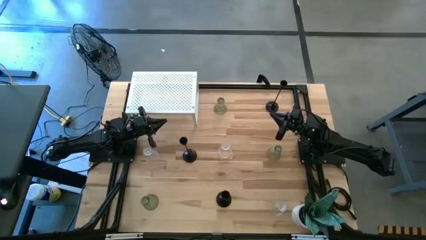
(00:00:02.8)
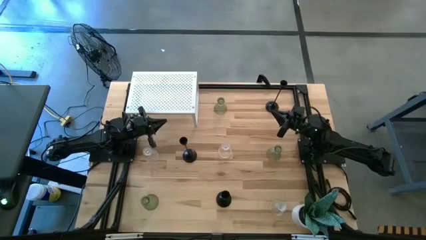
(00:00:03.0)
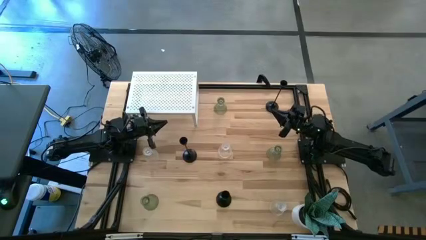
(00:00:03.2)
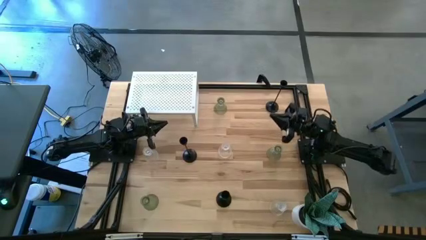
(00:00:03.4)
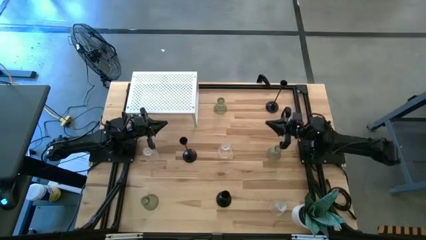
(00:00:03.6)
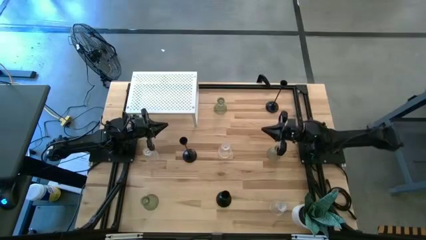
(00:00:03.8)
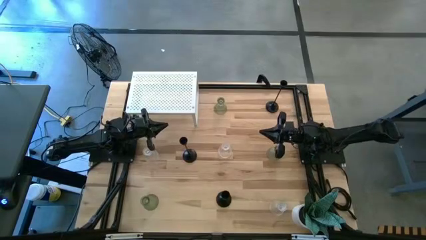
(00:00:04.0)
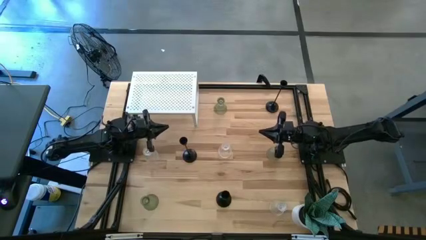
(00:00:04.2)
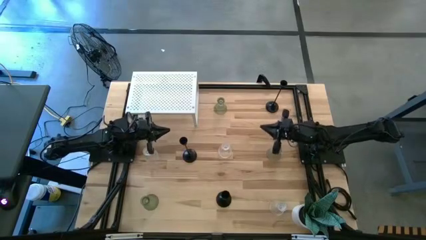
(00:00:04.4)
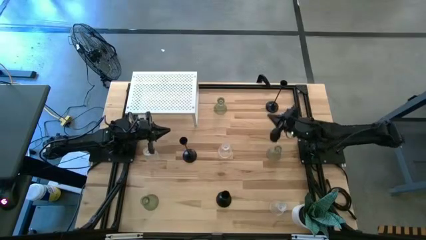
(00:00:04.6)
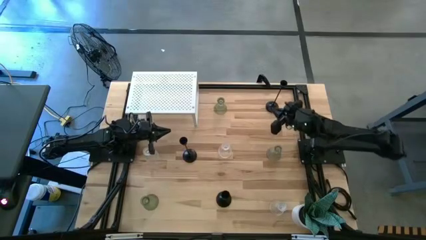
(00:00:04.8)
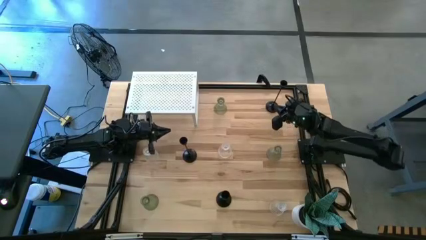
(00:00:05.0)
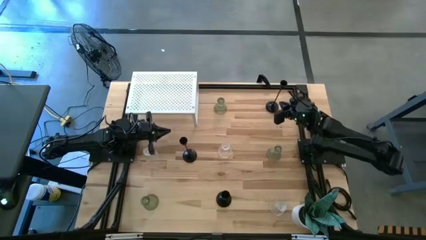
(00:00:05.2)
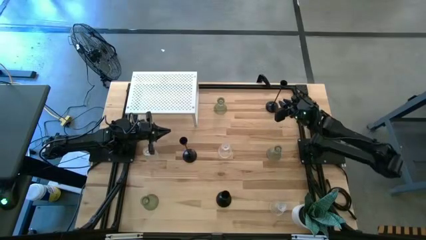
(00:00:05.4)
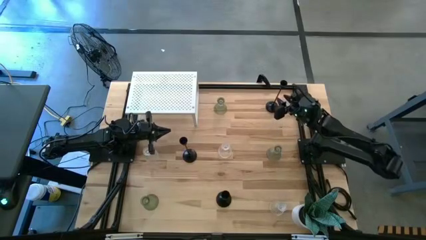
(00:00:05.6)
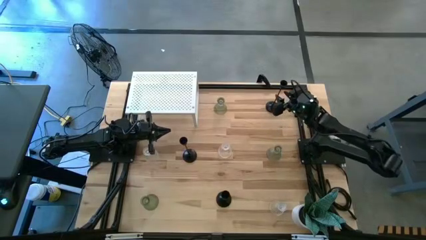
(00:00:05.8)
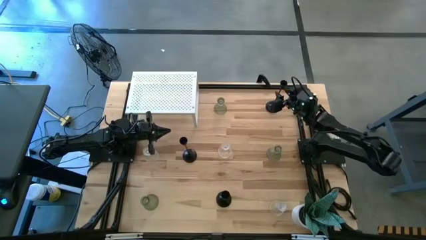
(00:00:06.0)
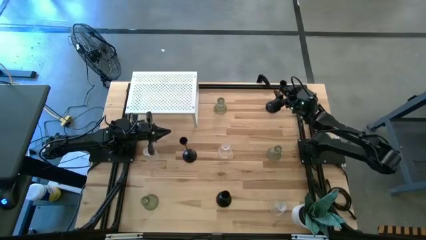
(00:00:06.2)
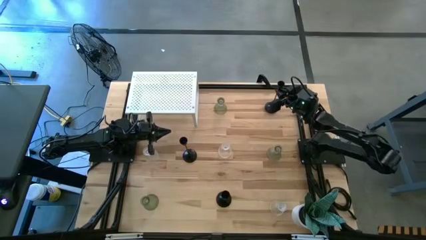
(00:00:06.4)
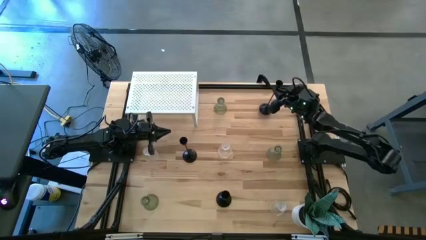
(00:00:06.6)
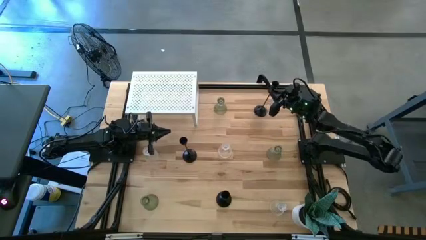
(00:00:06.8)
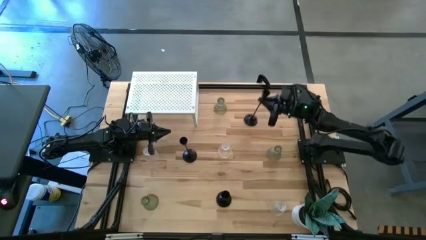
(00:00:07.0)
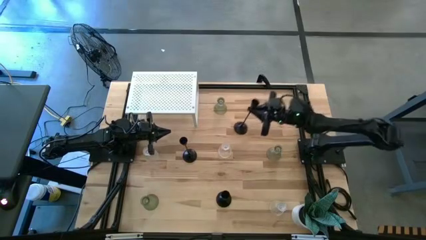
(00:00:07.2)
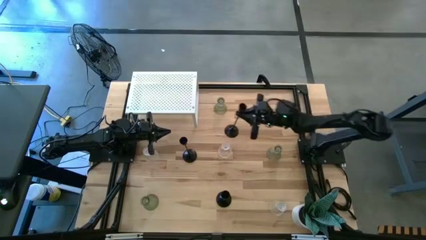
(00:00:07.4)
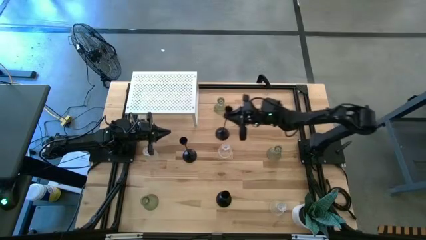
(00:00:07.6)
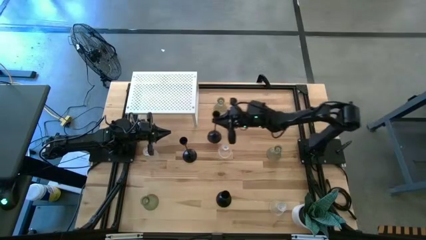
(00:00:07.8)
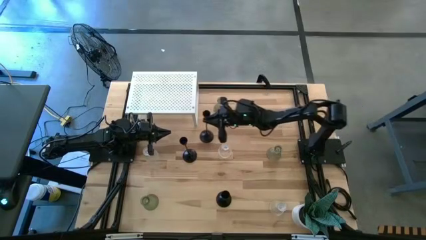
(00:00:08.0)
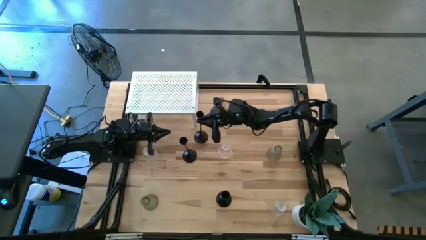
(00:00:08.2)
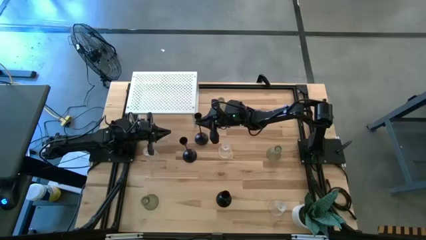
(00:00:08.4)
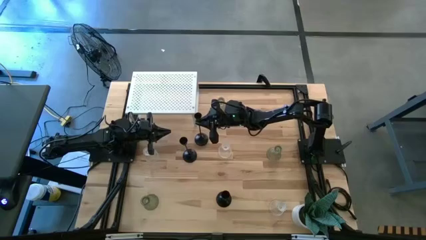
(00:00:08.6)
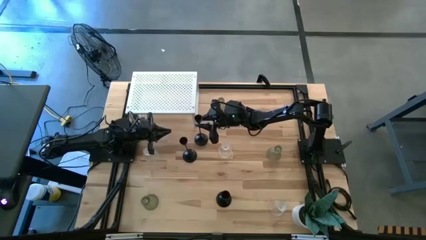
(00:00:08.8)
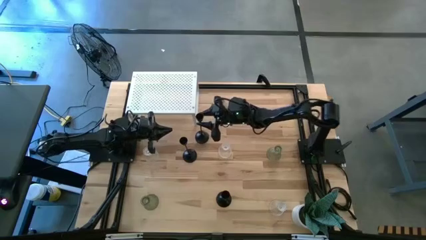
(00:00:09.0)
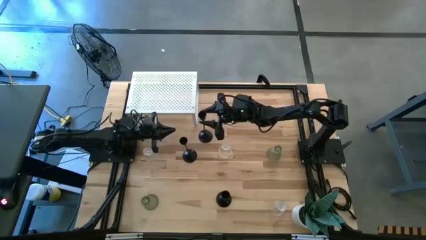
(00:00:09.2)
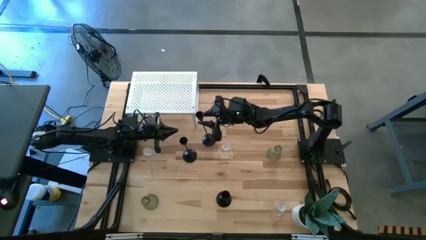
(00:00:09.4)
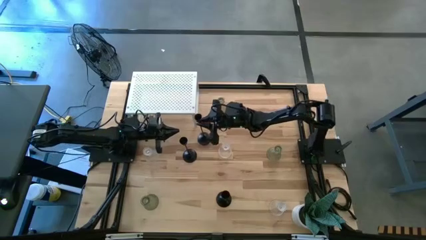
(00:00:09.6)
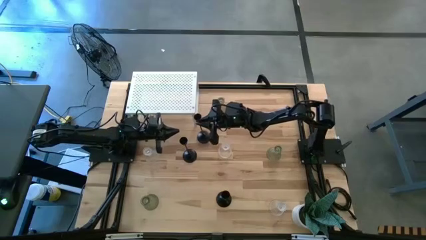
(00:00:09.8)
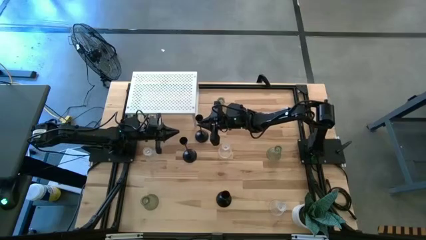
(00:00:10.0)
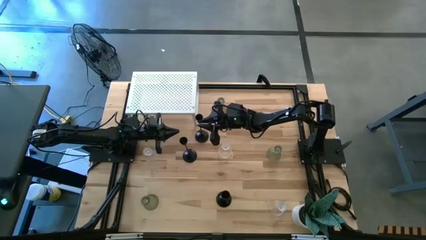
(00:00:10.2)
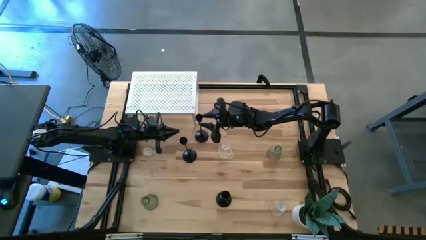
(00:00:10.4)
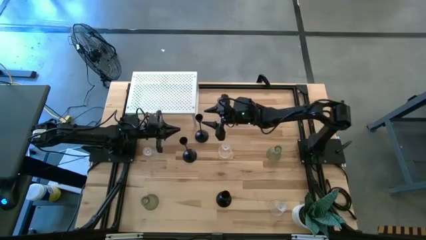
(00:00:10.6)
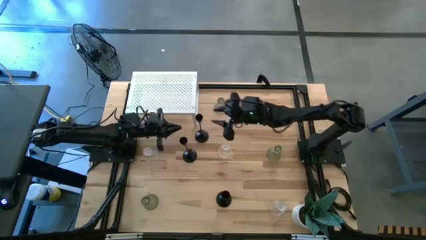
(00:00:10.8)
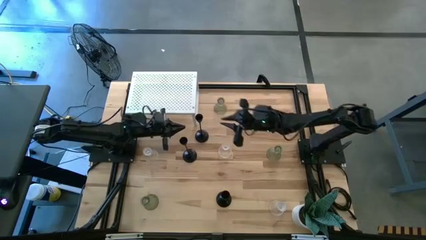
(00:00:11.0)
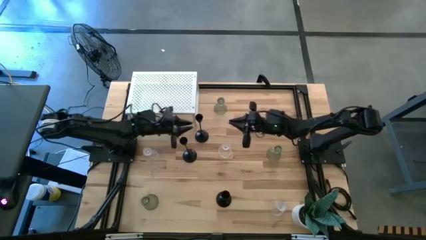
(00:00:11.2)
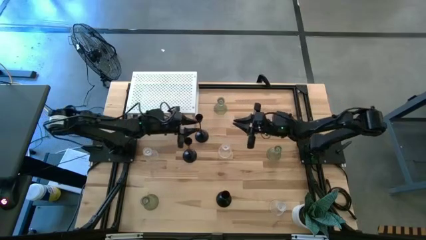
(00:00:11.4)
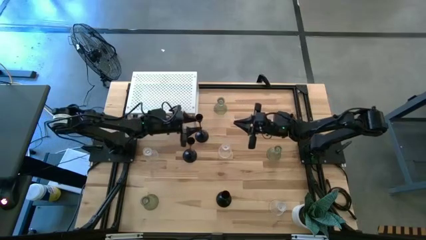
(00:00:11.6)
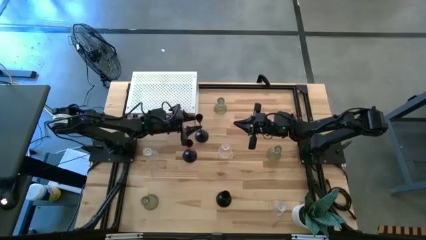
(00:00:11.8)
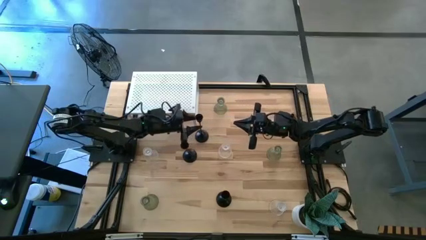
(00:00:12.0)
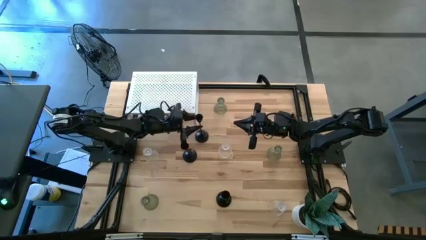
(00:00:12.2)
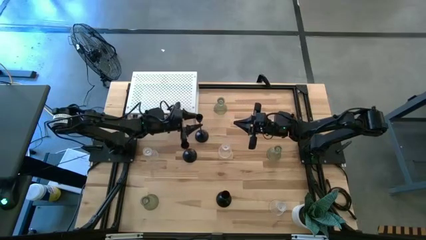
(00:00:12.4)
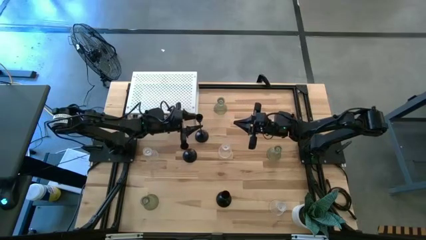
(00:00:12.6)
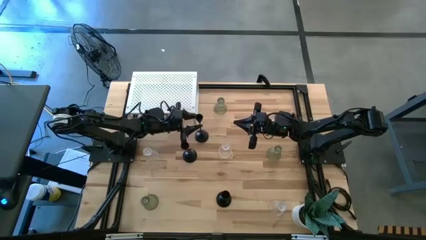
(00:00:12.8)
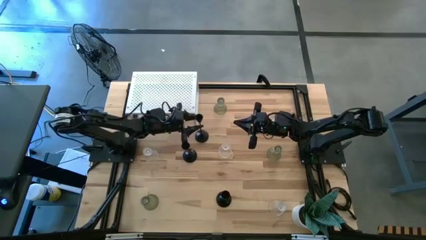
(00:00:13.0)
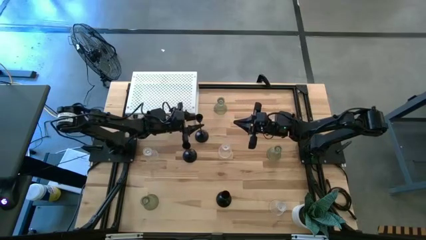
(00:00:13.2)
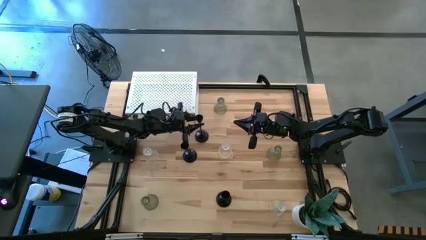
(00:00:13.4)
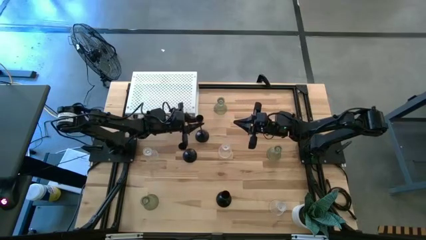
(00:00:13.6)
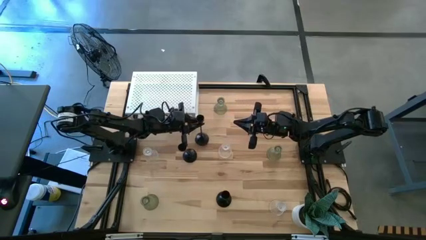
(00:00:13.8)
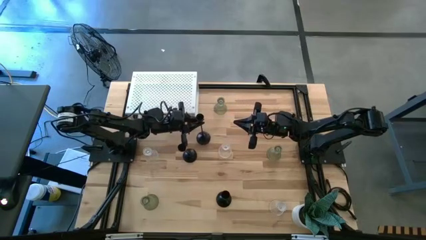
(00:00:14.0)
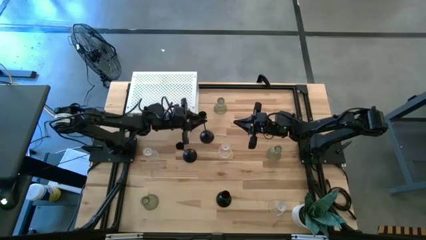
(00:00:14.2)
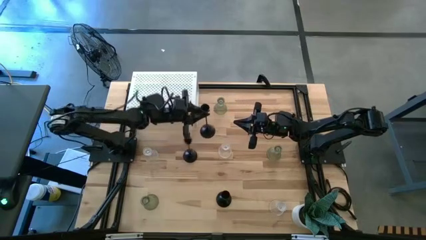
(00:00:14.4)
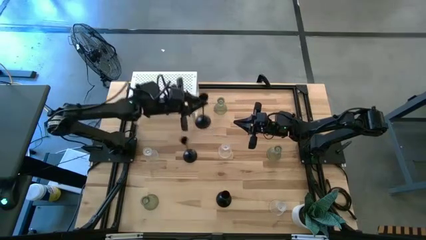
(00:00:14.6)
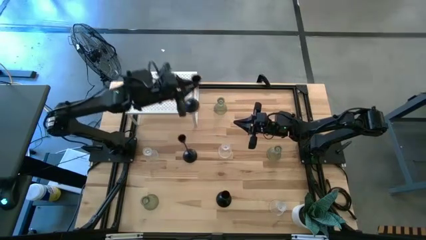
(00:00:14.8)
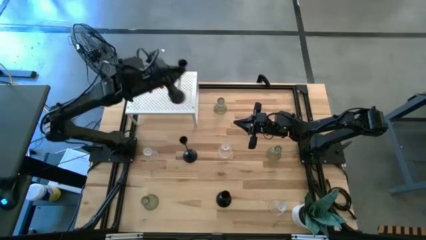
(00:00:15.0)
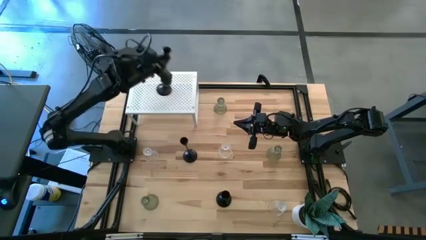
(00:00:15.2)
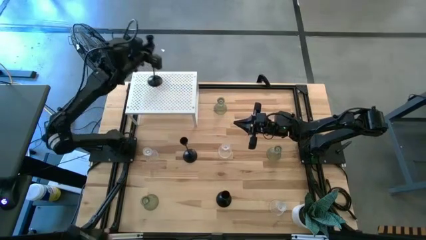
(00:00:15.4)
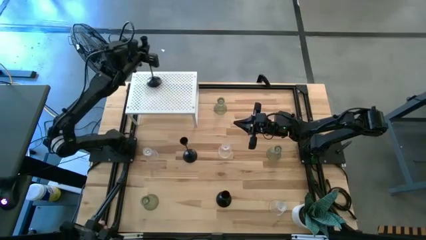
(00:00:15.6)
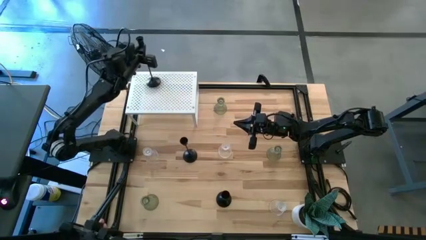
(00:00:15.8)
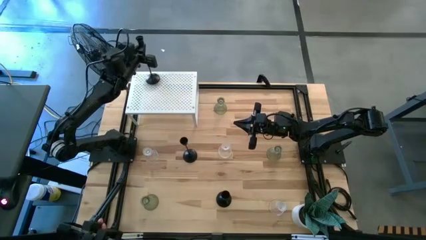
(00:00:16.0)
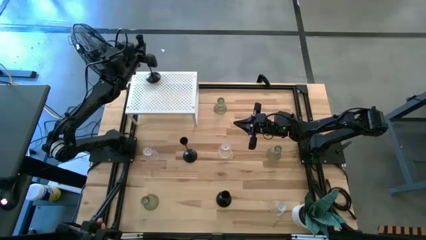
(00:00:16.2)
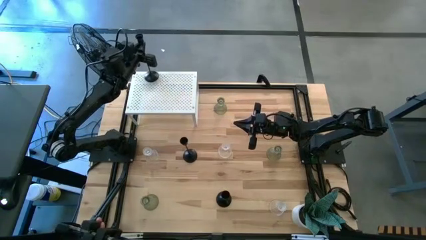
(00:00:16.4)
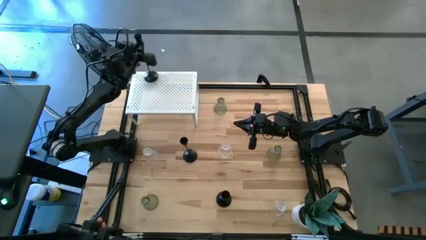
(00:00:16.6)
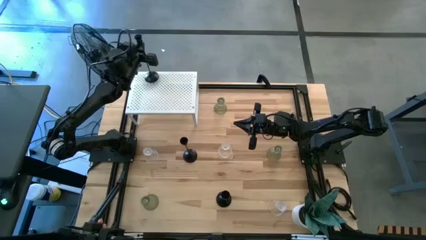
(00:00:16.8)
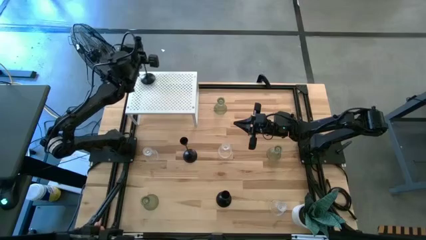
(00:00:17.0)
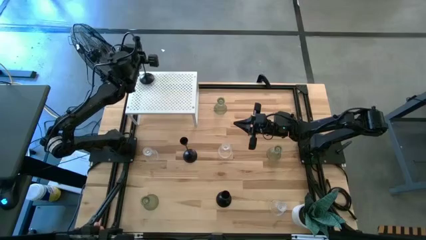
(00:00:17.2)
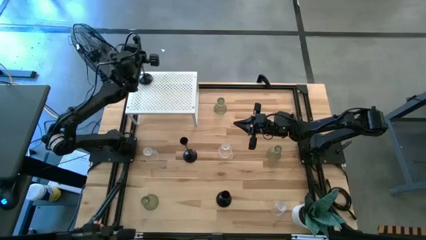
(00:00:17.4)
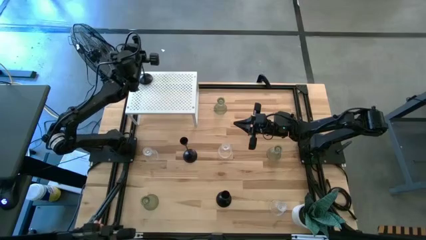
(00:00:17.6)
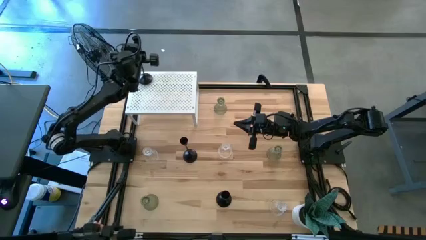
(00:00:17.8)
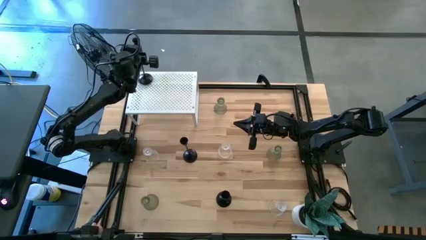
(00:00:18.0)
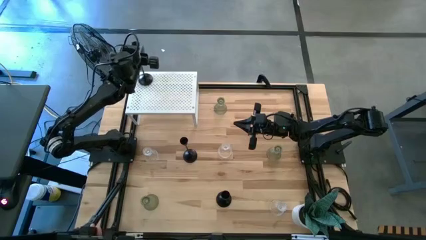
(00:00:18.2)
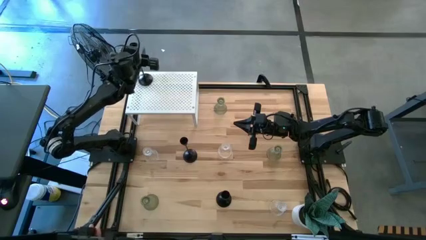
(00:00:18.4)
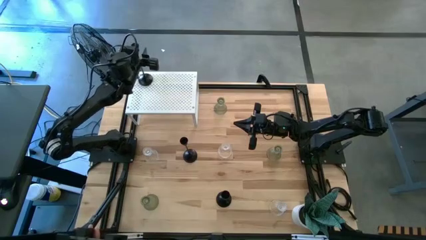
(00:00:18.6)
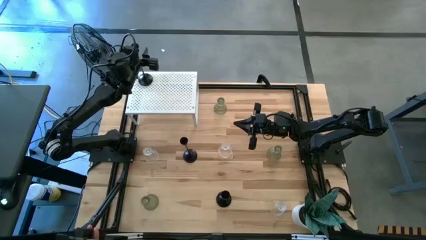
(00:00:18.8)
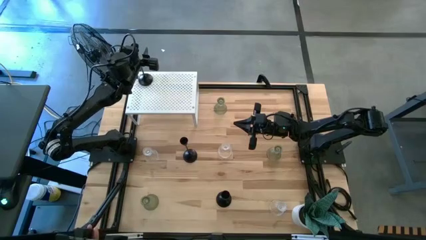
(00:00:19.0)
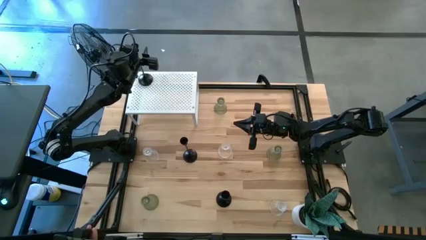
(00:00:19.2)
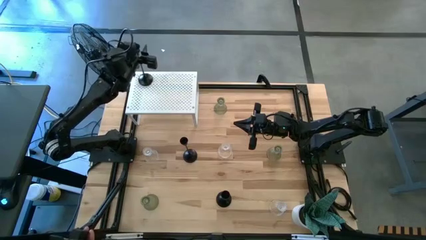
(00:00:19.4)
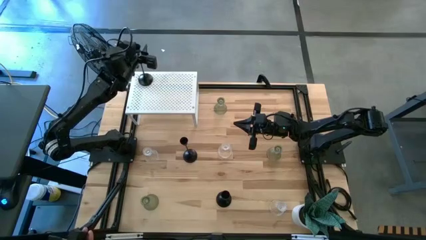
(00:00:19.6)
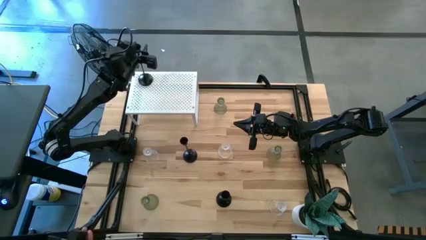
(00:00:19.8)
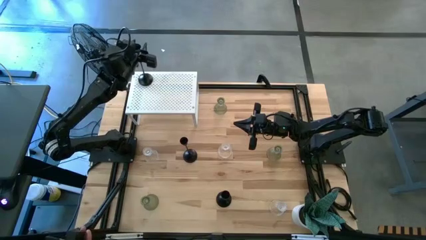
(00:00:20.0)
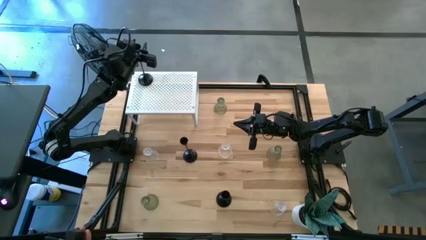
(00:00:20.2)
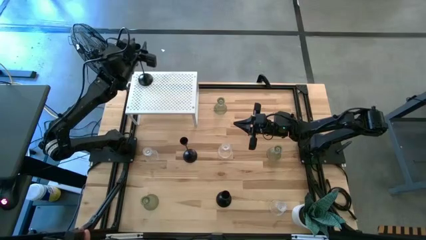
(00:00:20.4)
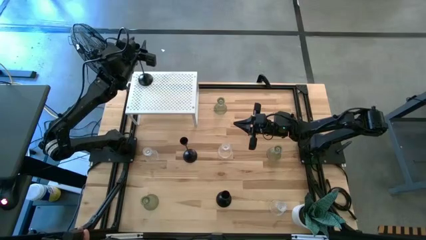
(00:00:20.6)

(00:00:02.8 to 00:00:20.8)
Task: Pick & Place candle stick holders
Put the top black candle holder on the shelf
